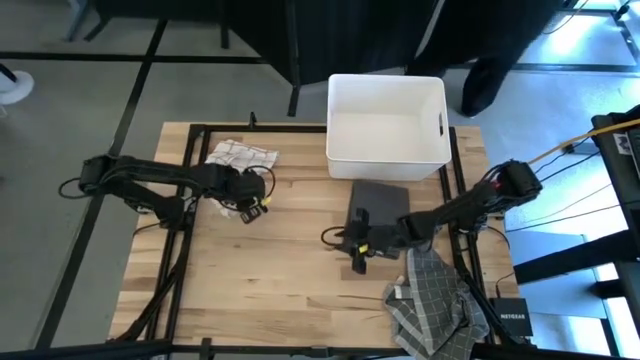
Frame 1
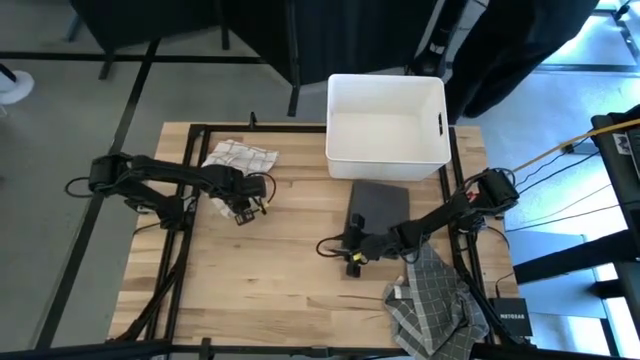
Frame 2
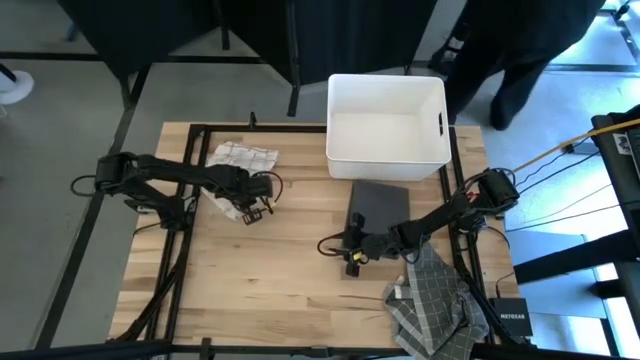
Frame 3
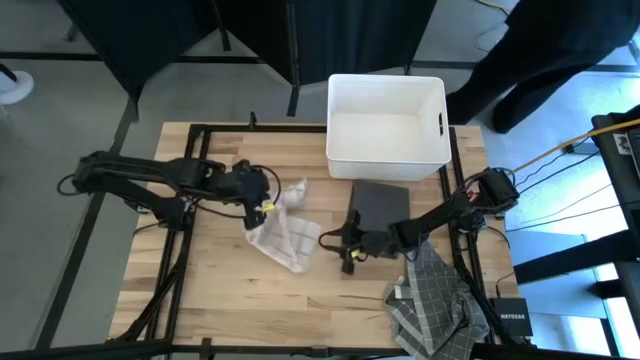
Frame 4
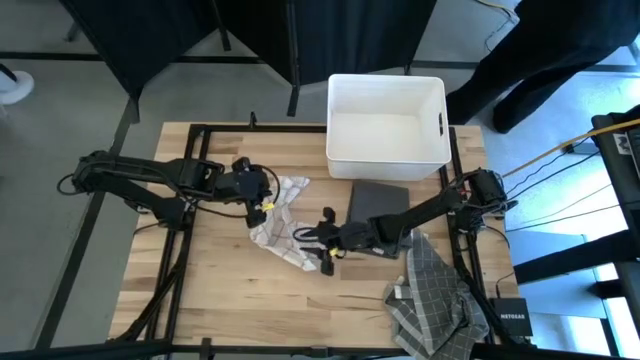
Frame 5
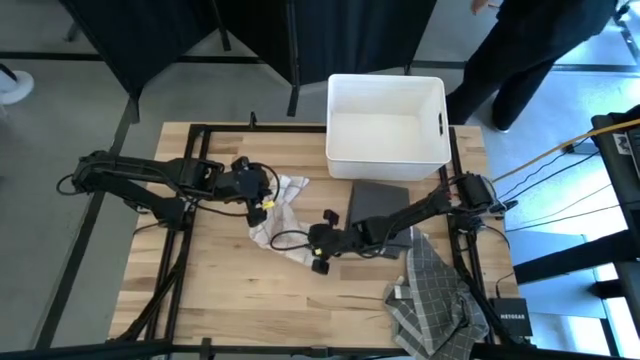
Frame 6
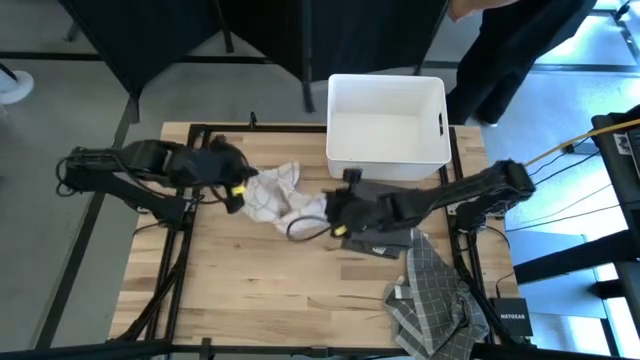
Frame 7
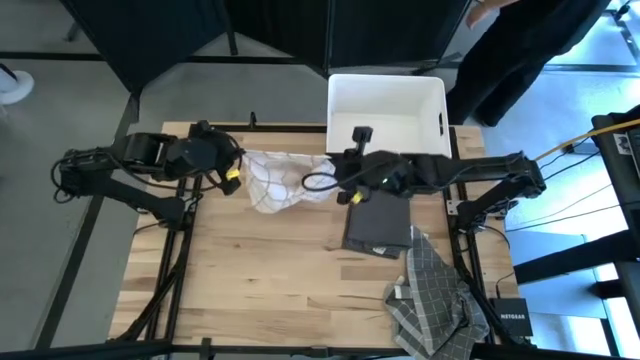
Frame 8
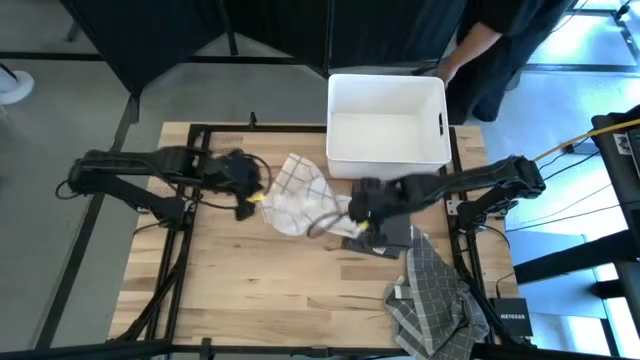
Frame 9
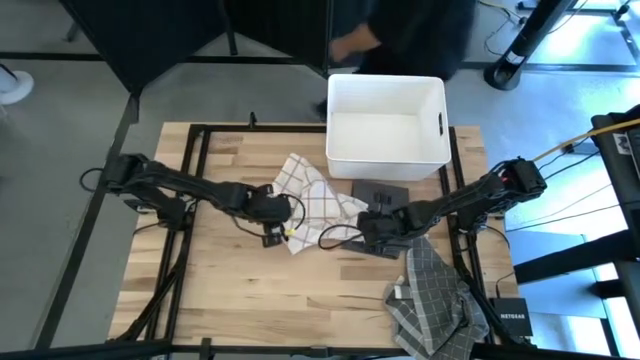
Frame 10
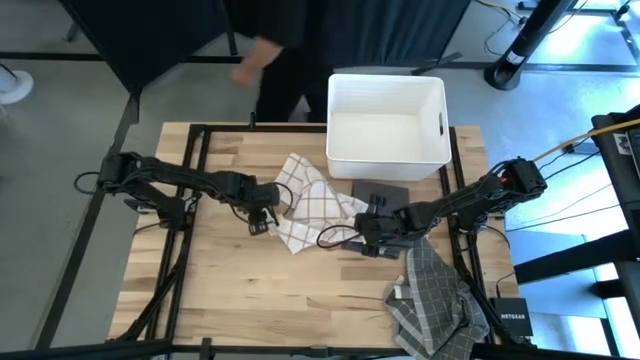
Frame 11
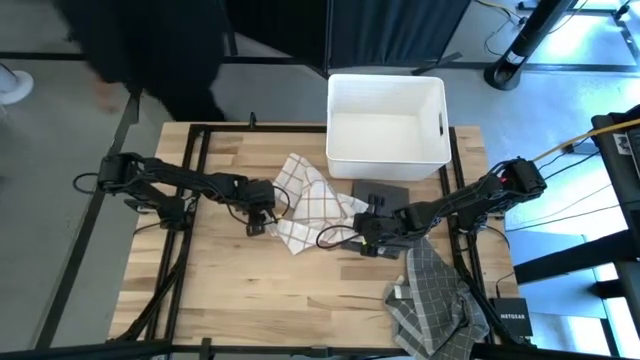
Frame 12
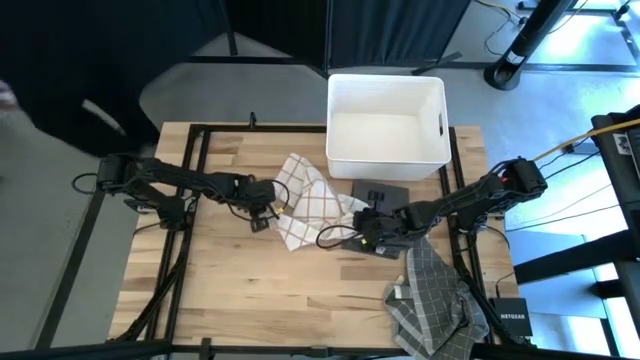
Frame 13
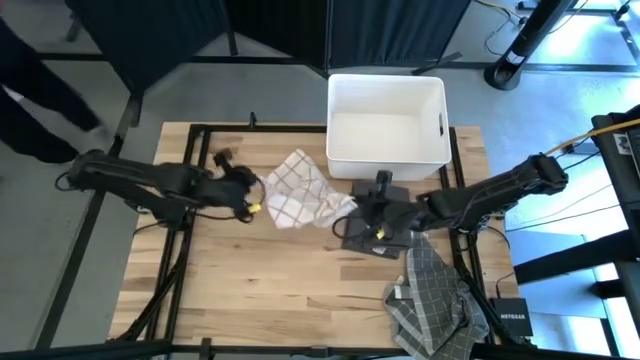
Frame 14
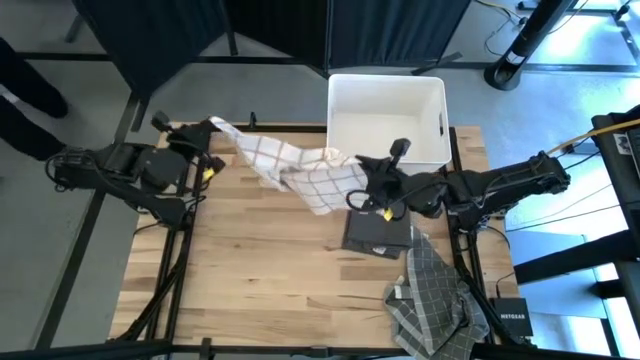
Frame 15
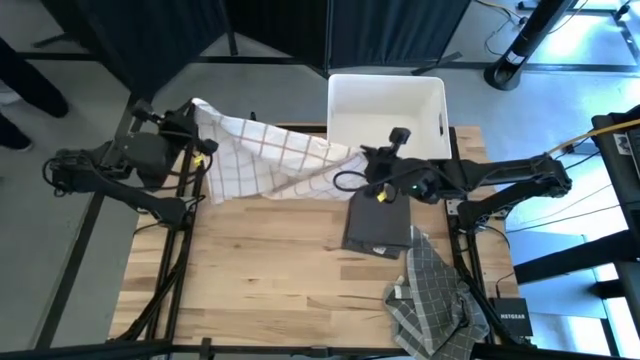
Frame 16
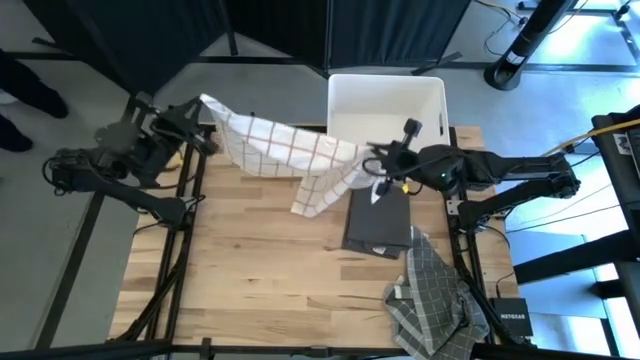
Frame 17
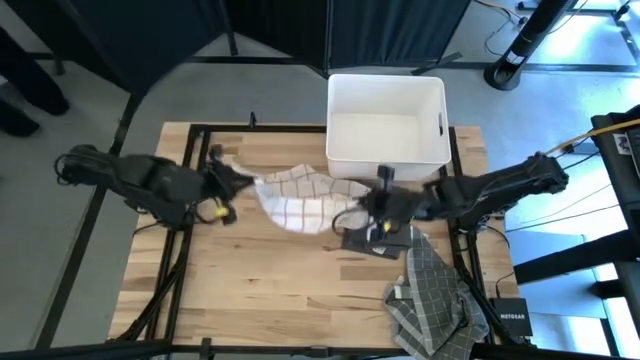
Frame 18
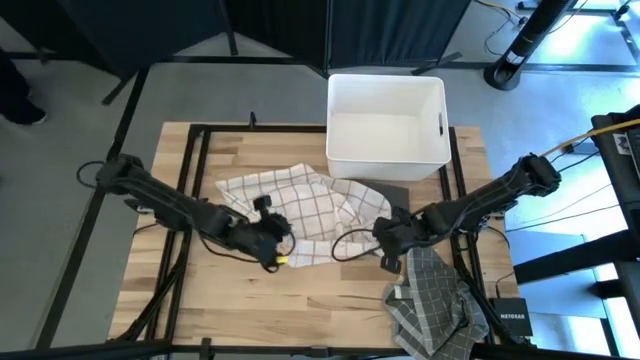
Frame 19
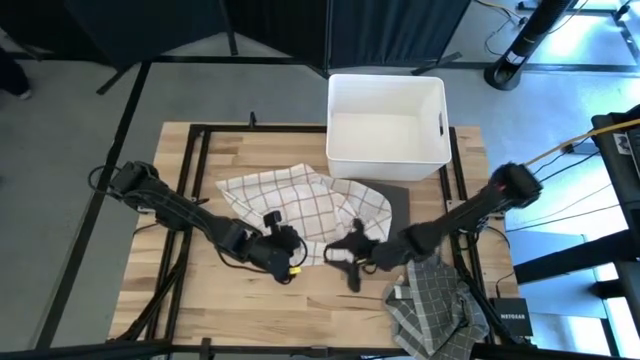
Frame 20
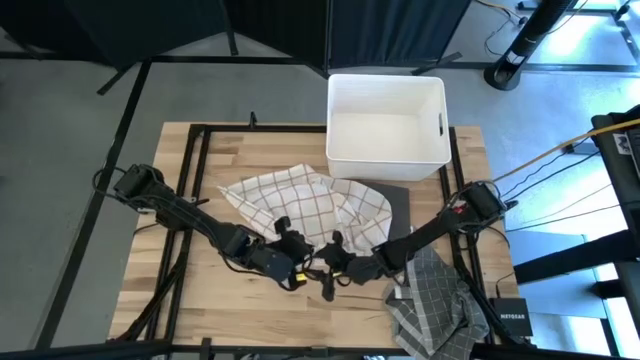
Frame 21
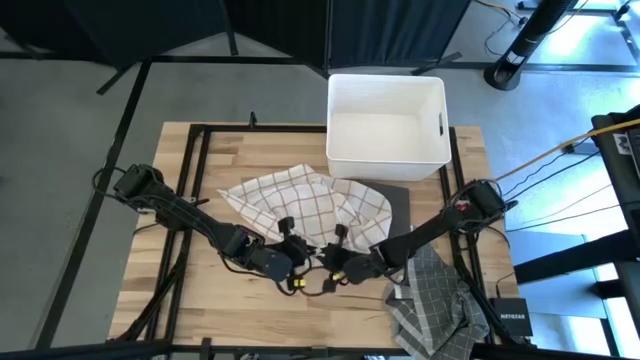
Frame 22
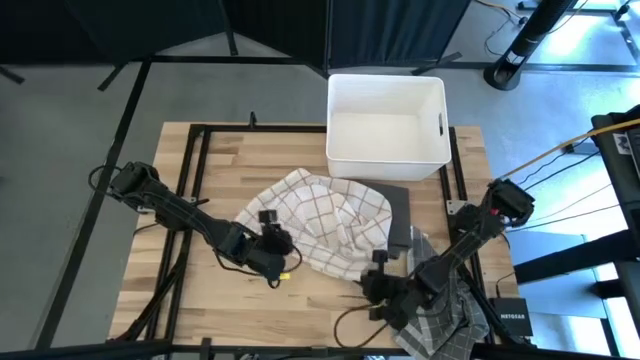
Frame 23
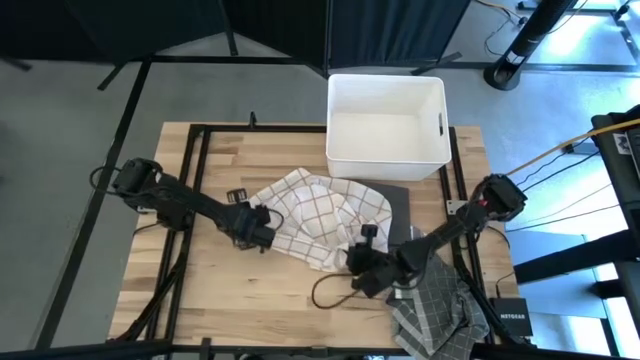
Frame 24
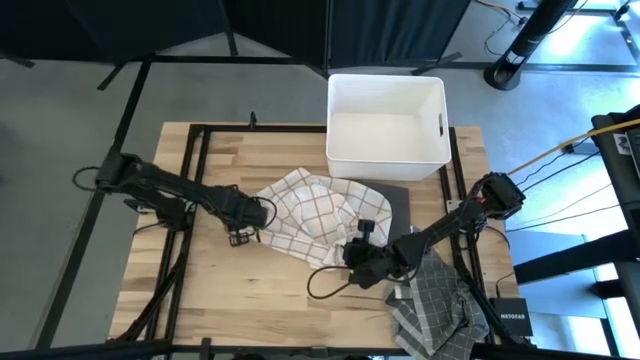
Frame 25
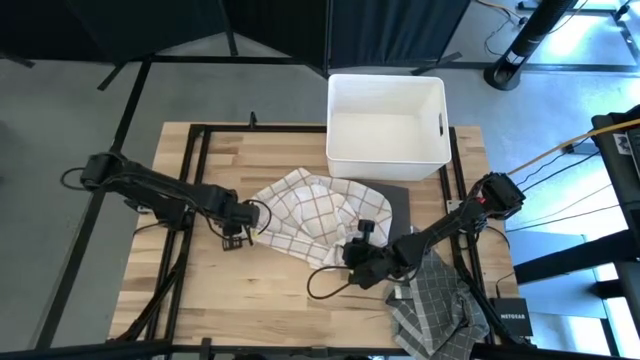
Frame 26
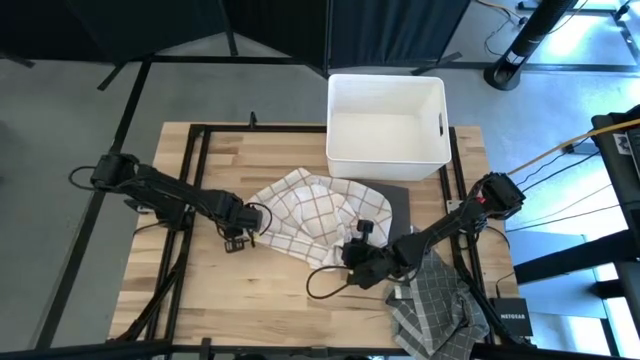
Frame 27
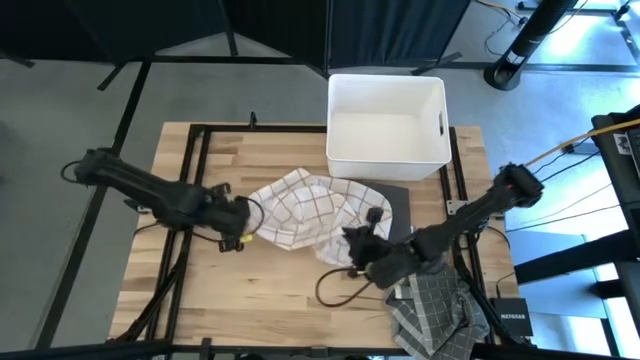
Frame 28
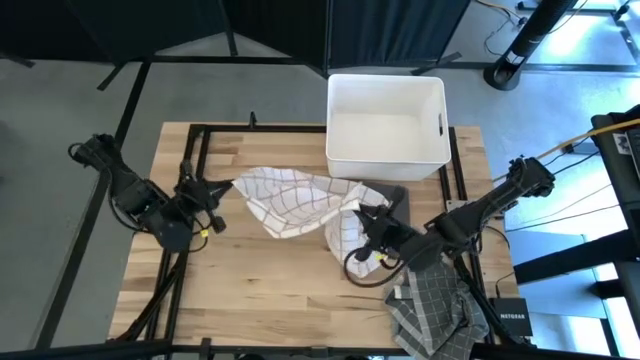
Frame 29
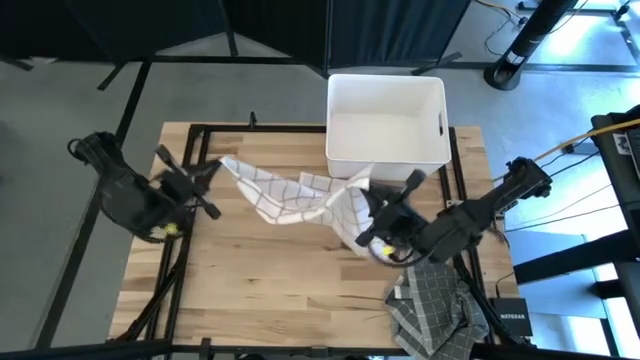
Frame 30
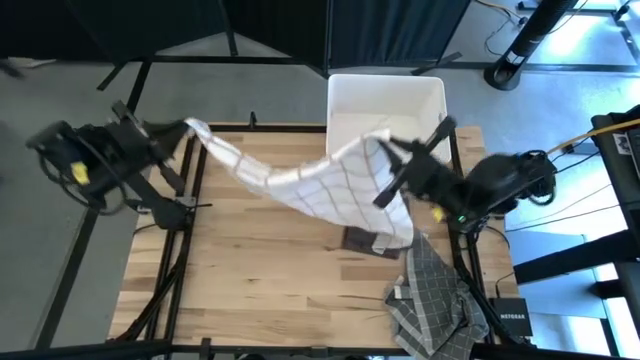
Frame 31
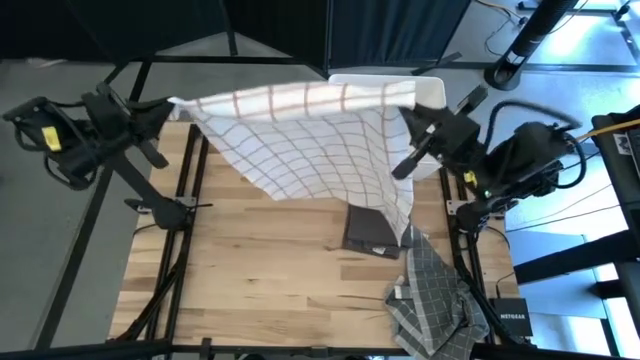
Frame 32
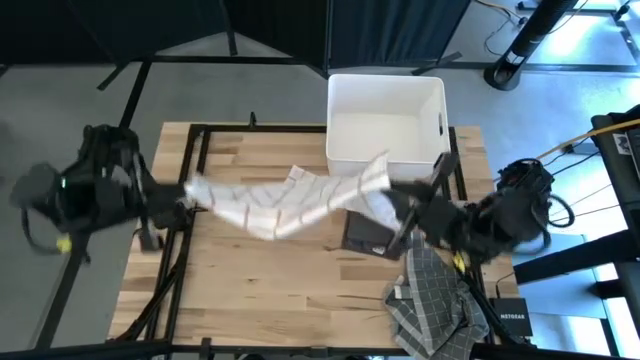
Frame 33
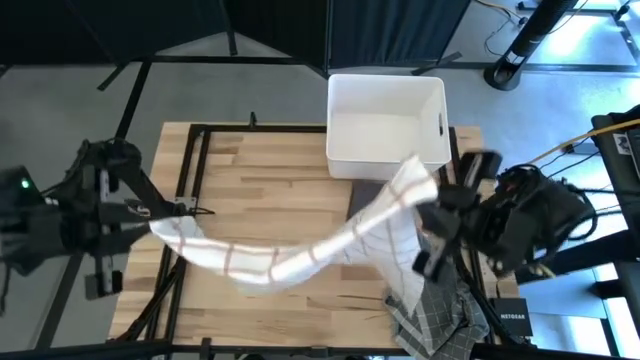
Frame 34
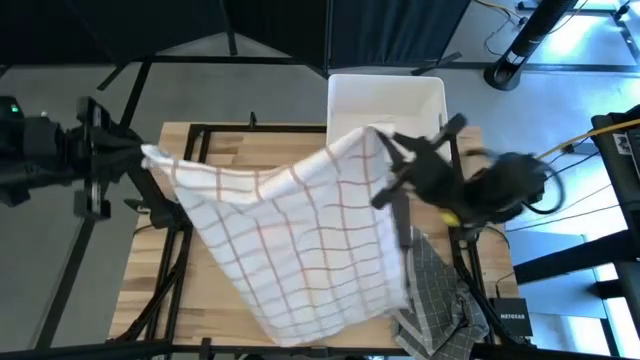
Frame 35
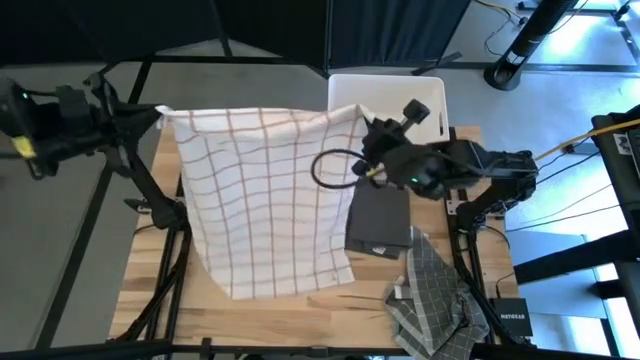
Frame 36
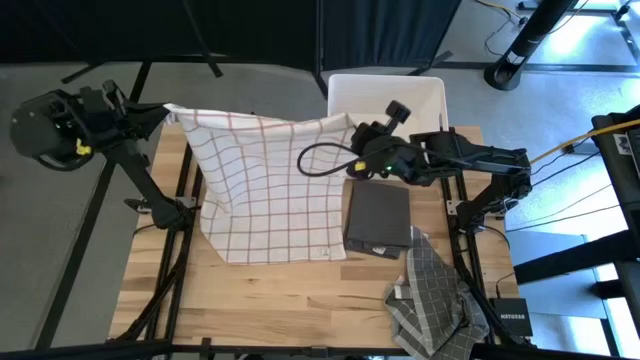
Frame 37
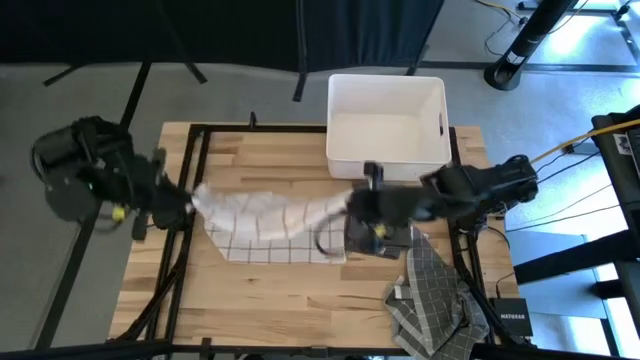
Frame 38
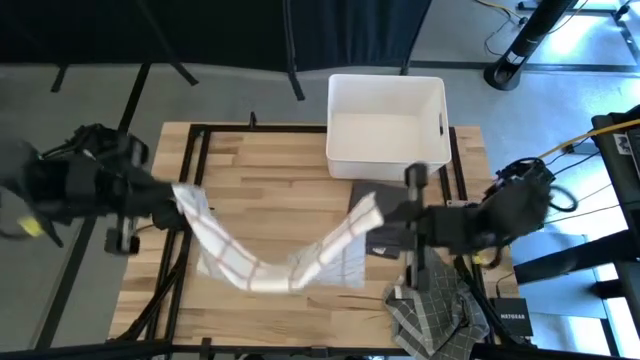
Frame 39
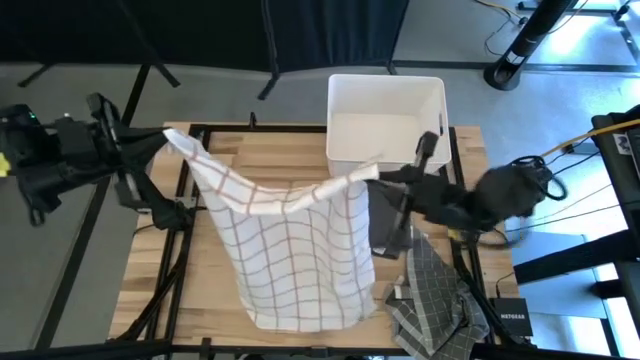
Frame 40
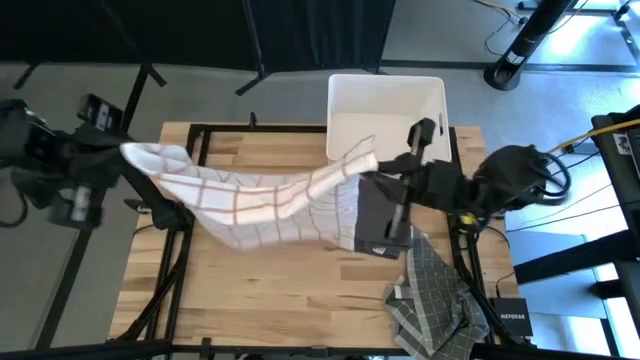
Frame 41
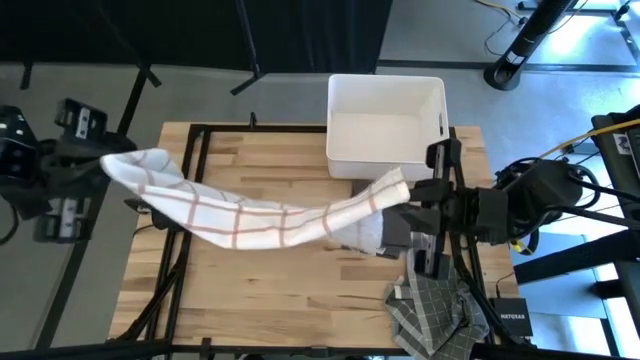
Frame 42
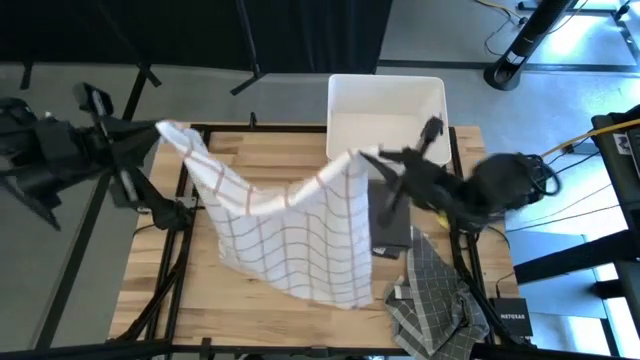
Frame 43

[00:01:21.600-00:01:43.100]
Task: Fold towel
Fold the white towel
